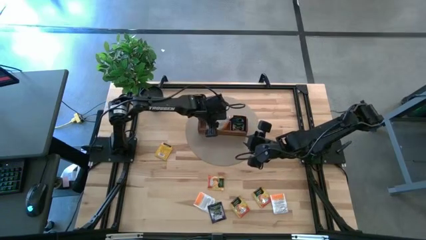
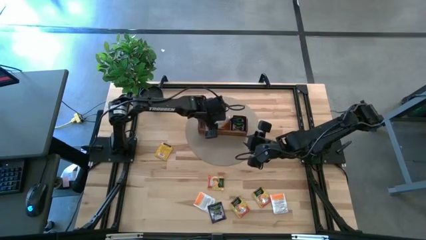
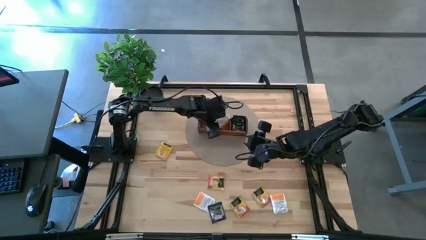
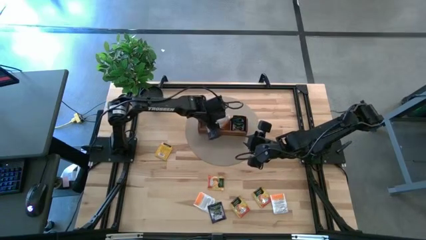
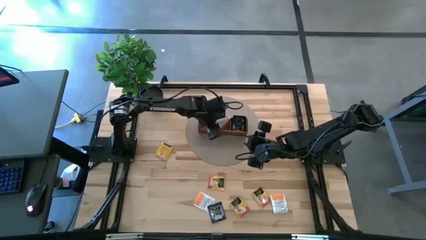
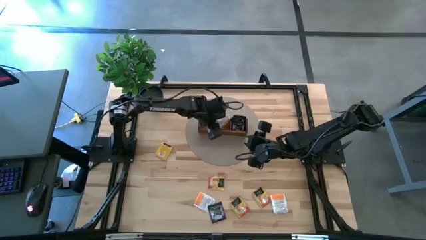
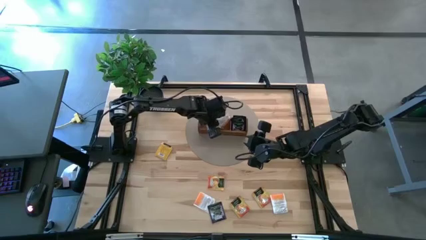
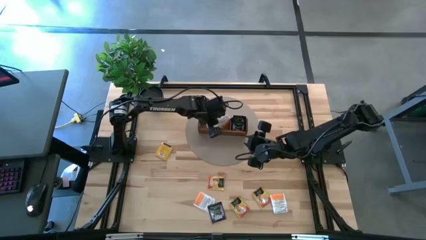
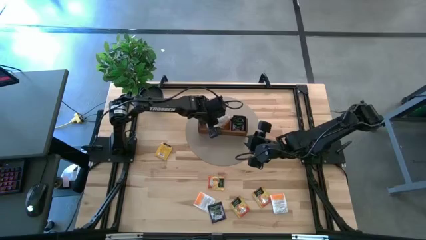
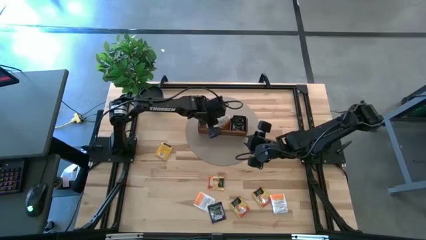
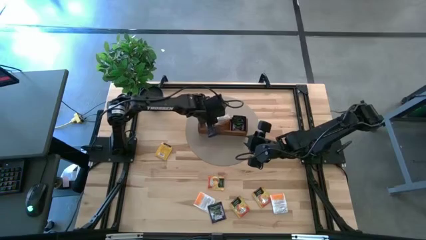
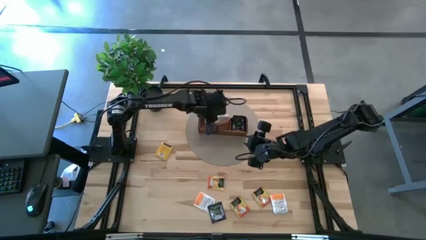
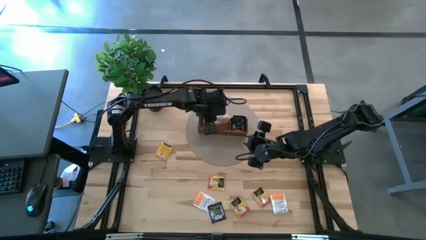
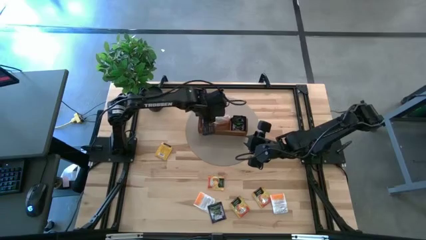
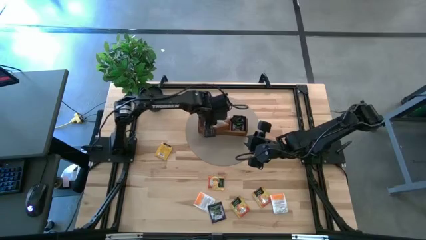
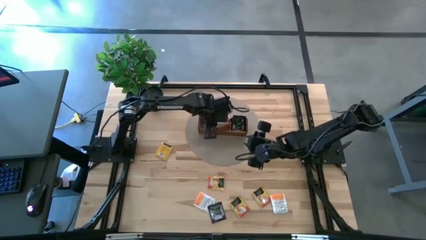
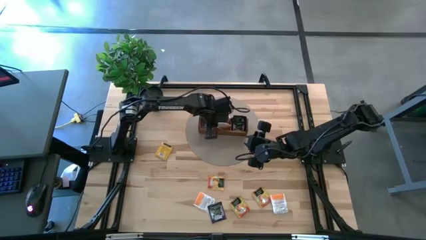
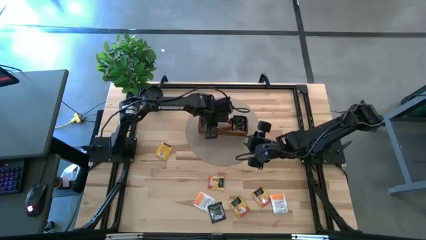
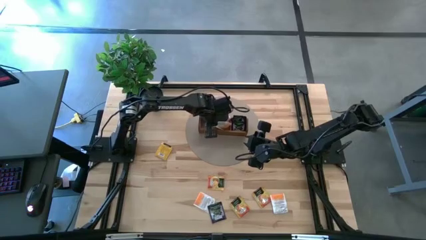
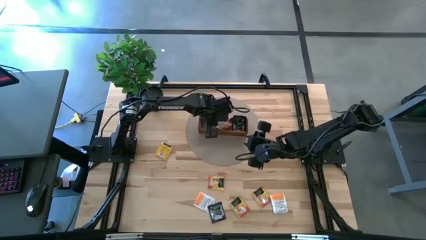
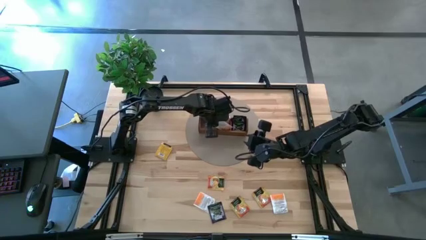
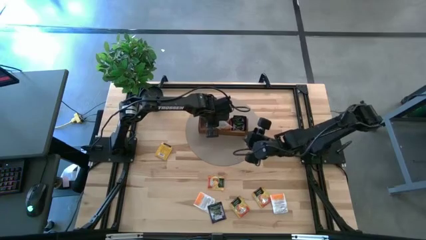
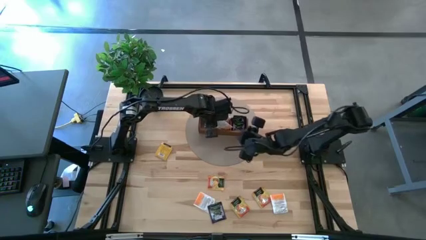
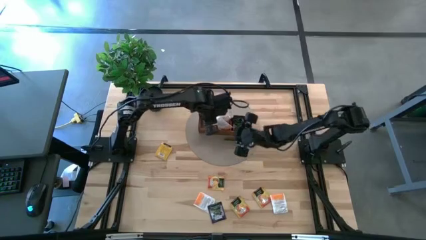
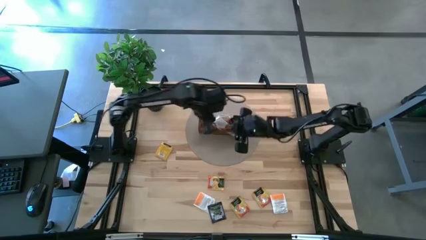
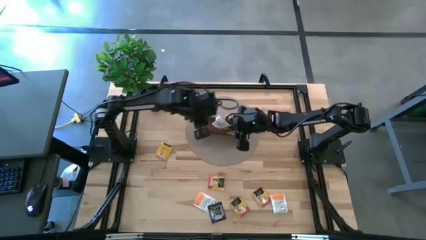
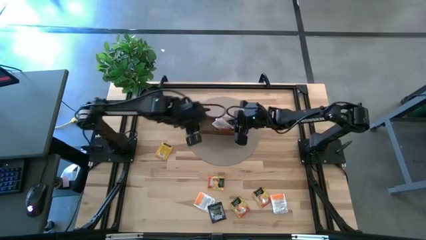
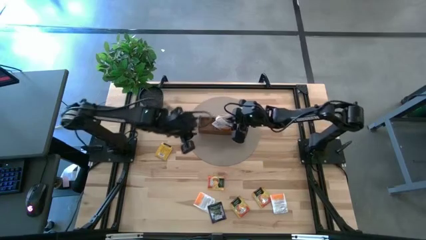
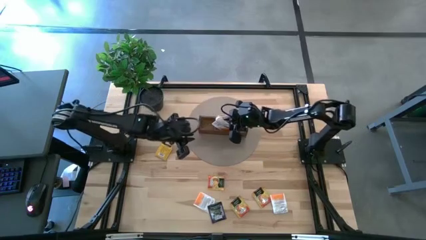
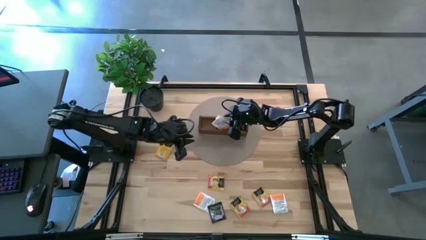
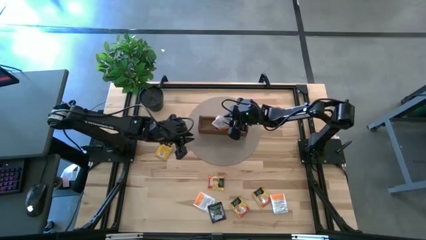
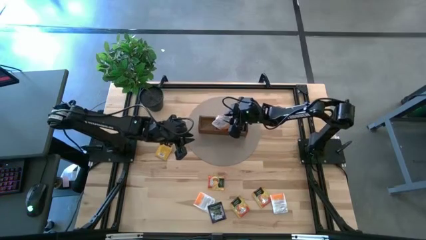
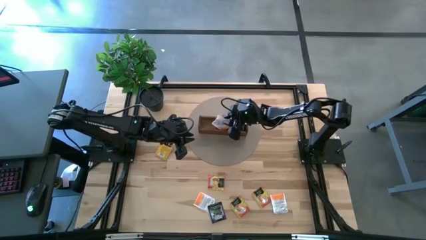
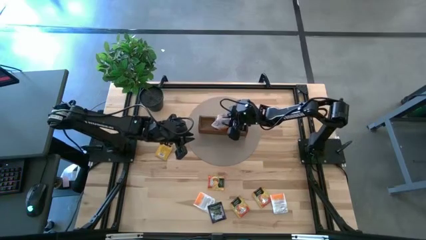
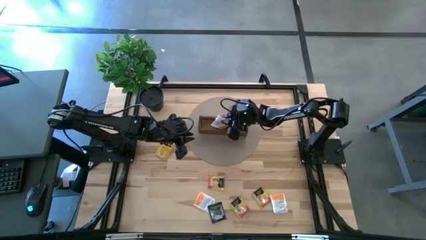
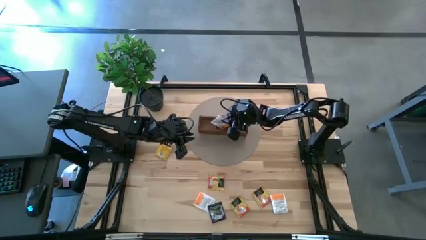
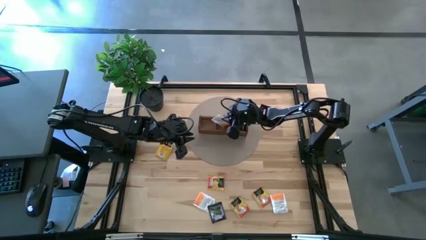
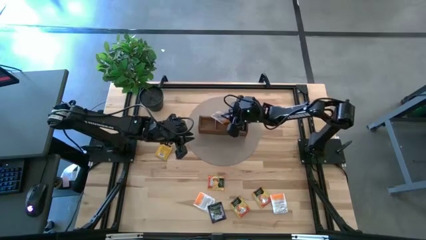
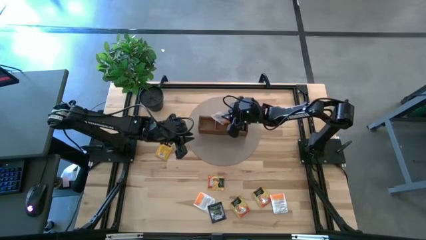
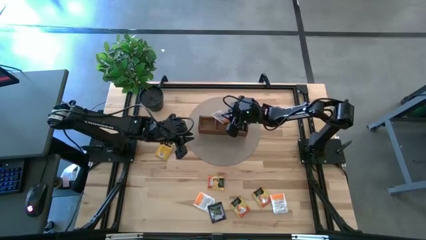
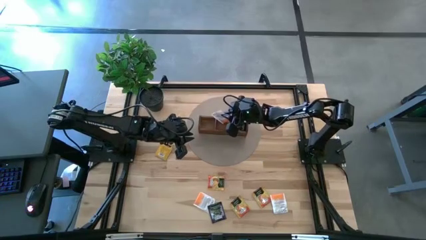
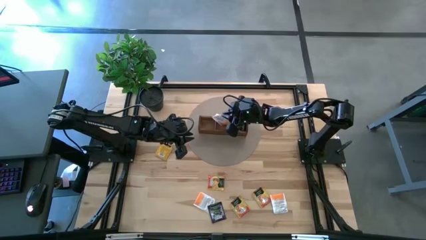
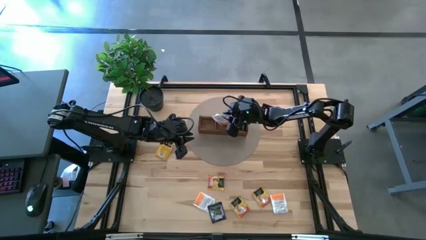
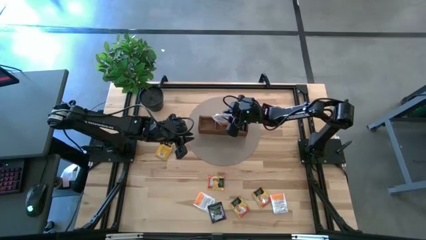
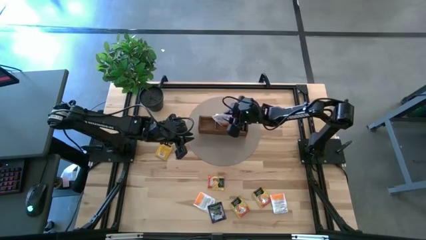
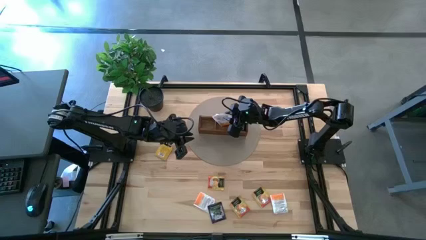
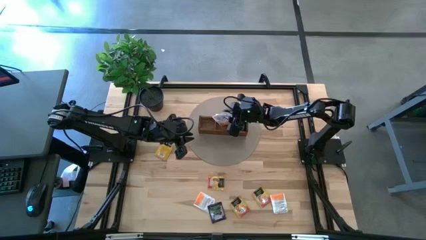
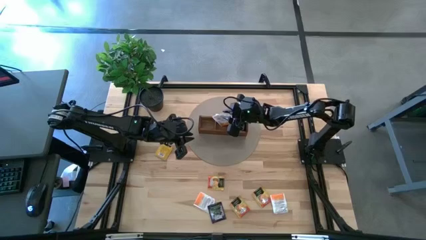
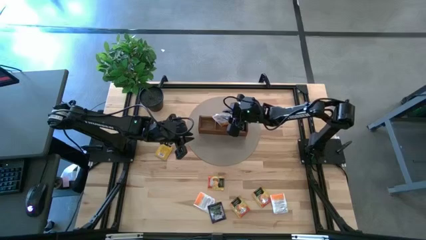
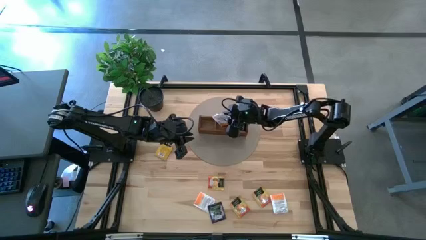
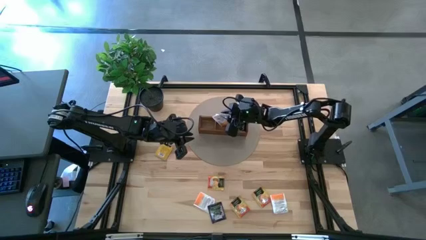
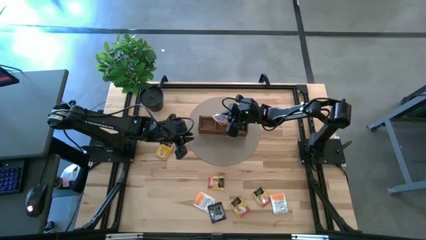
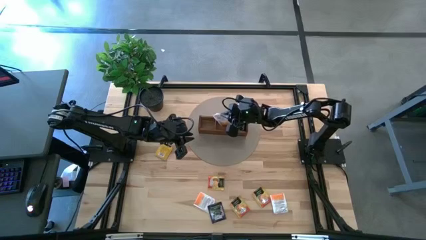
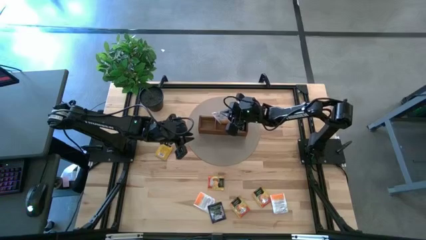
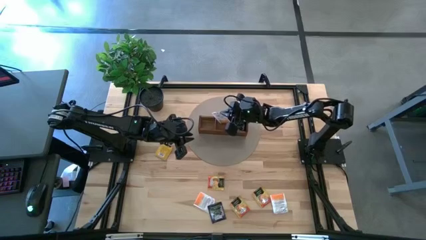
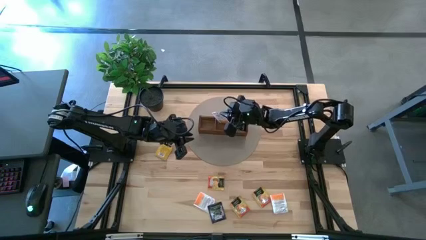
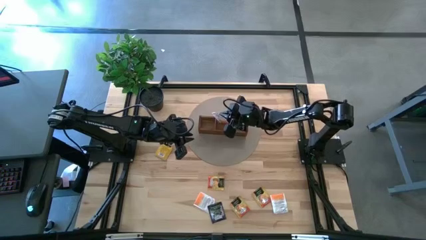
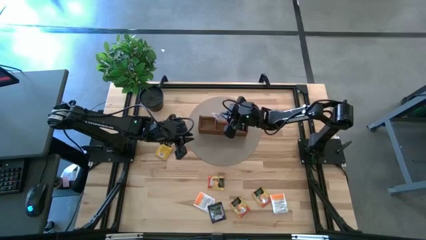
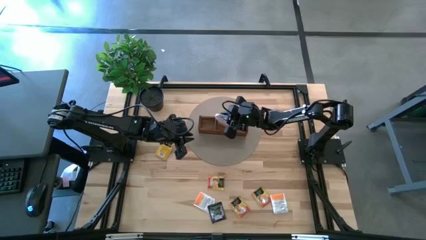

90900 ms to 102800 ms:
Task: Pick & Place Tea
Put the white tea bag into the middle section of the wooden organizer

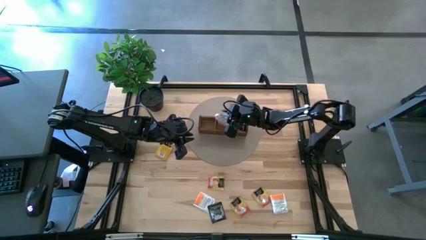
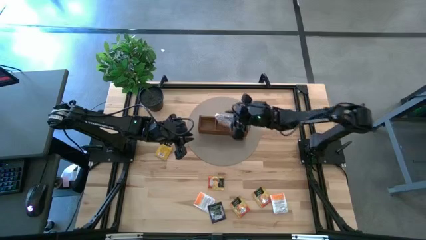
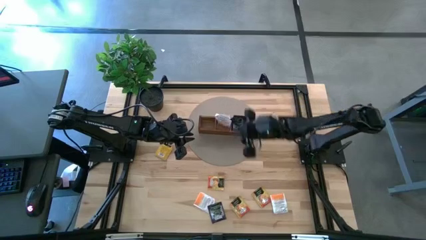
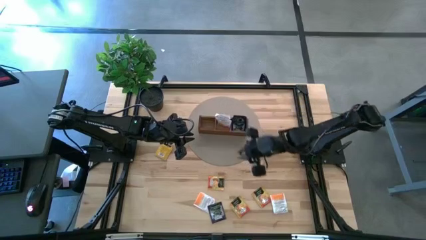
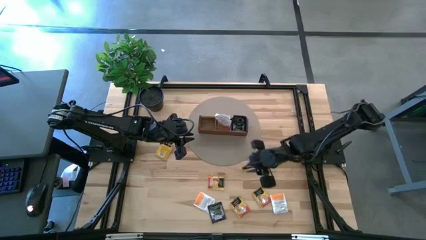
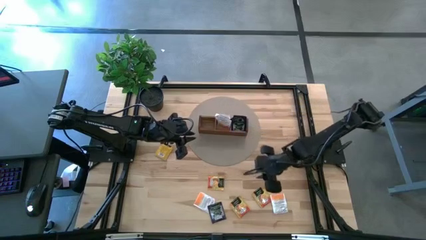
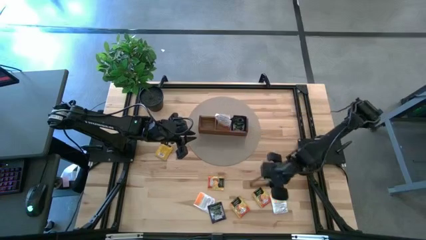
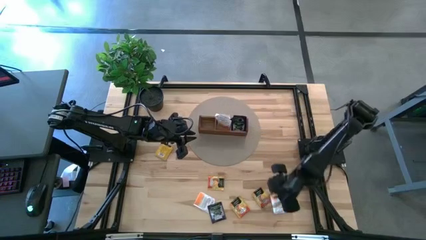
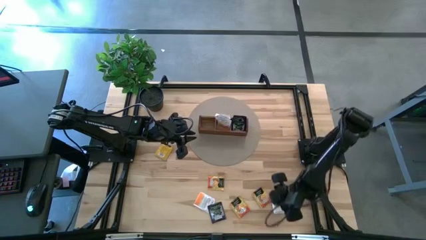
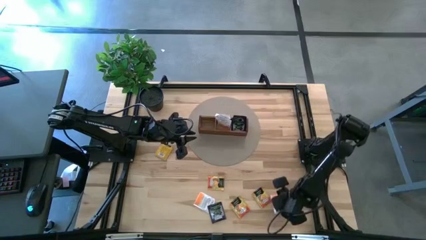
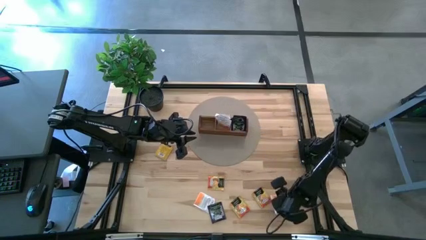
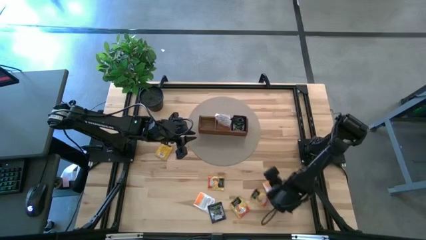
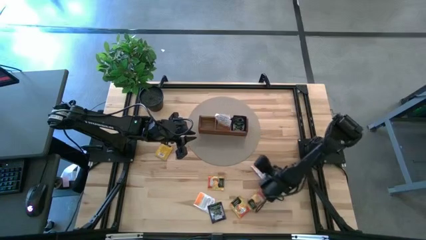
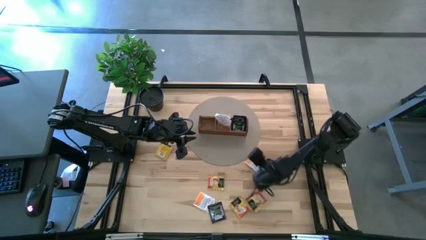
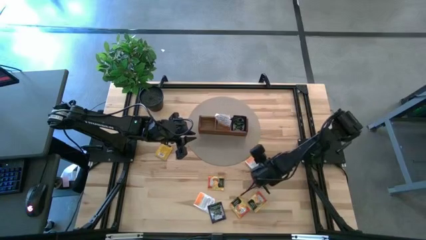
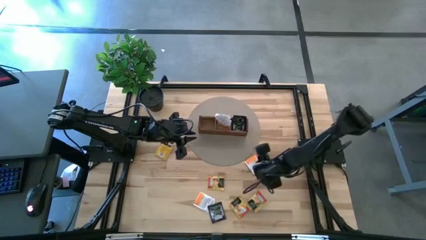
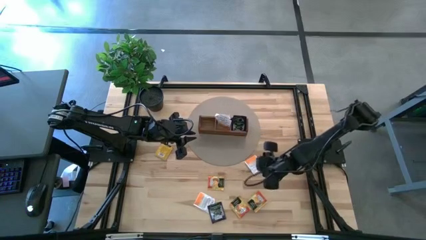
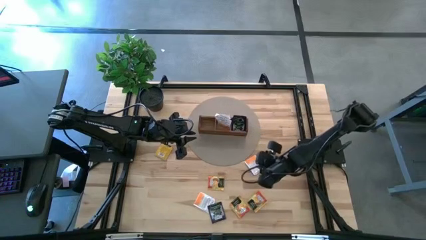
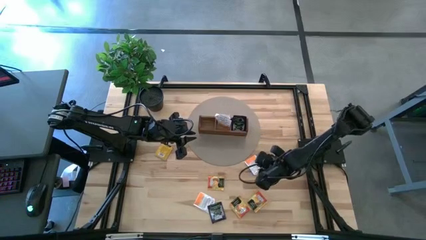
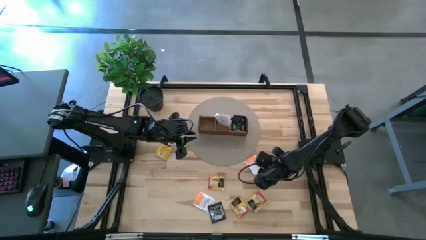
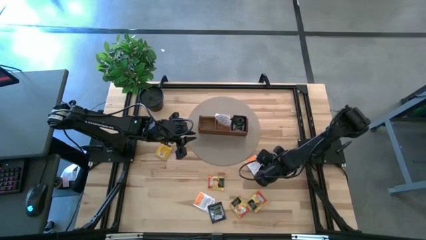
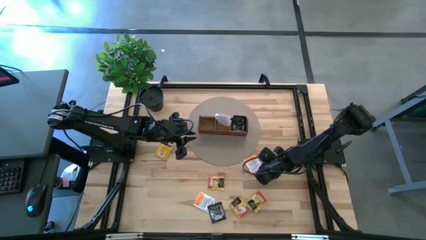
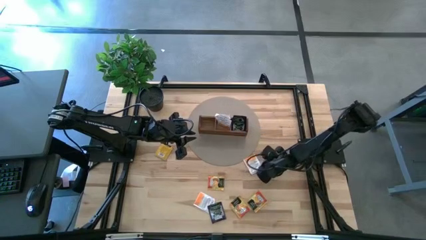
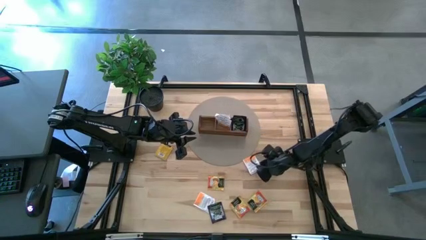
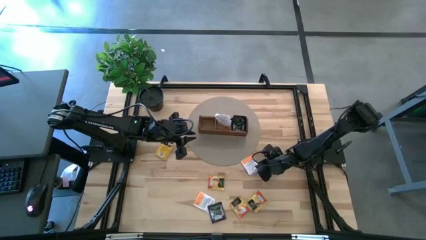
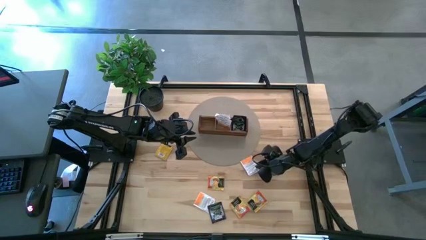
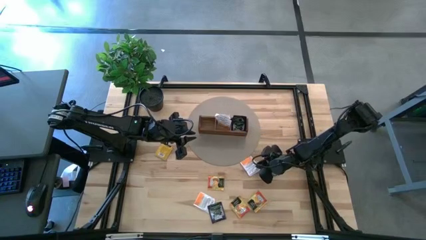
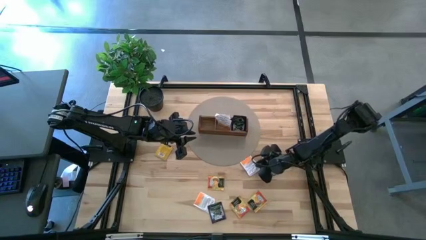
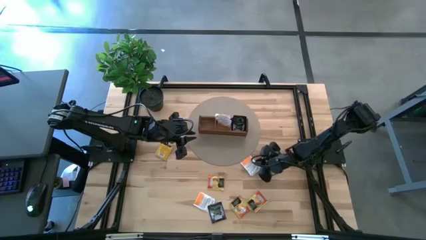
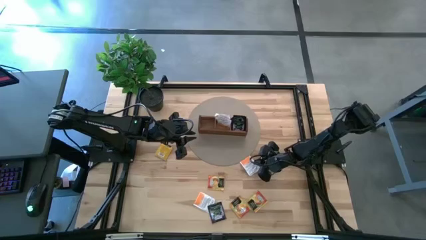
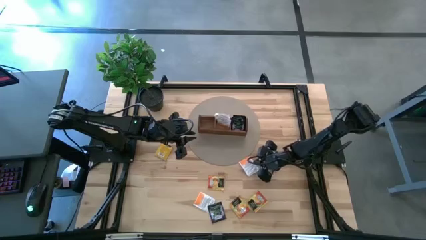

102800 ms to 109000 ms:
Put the white tea bag into the middle section of the wooden organizer
